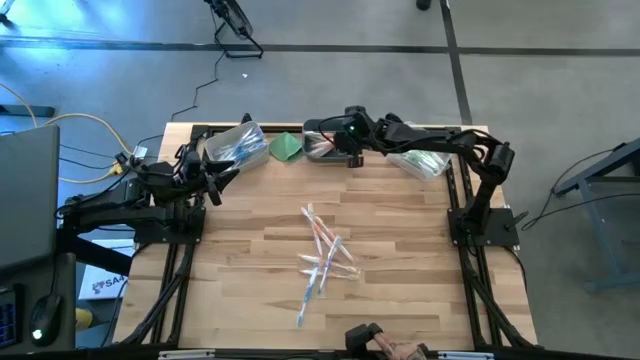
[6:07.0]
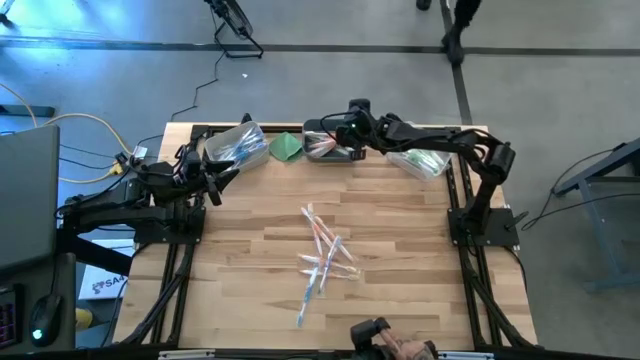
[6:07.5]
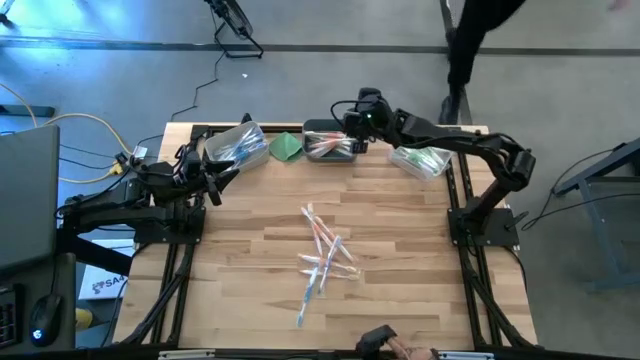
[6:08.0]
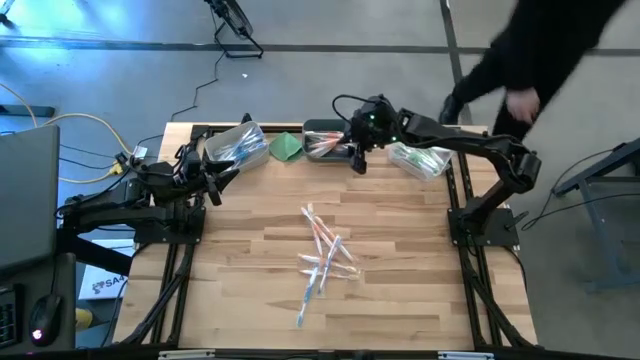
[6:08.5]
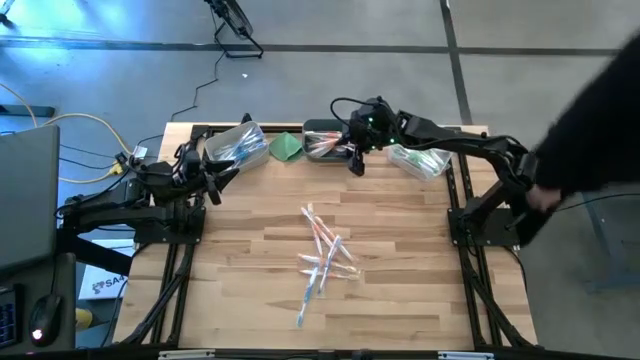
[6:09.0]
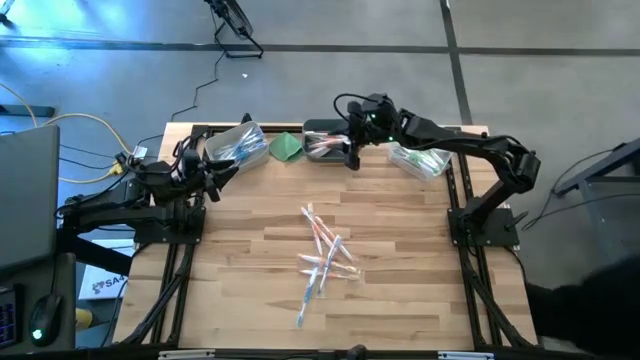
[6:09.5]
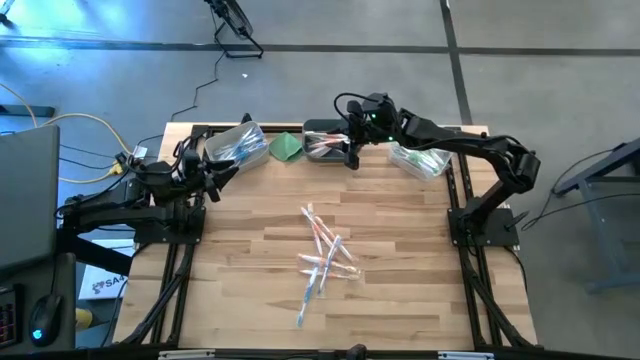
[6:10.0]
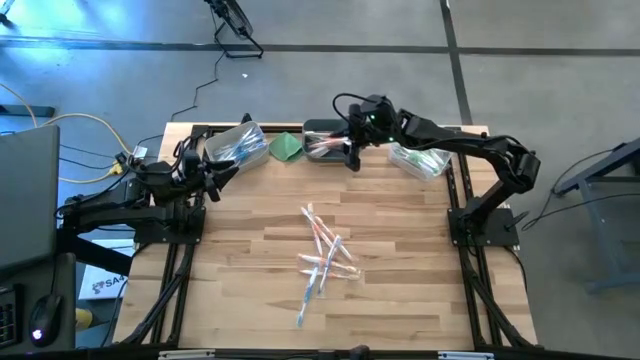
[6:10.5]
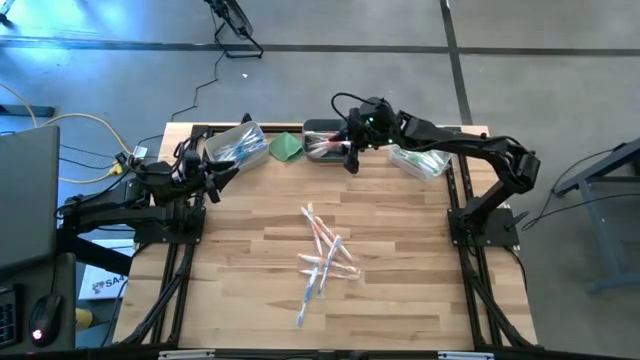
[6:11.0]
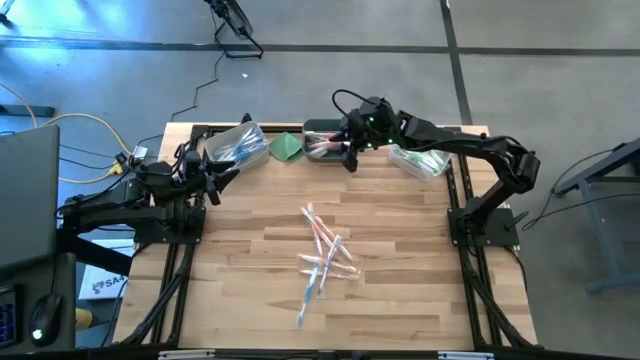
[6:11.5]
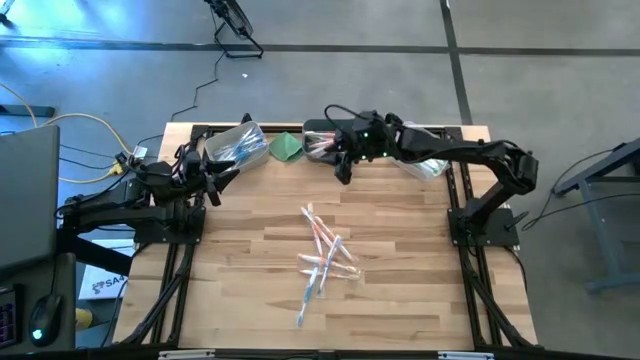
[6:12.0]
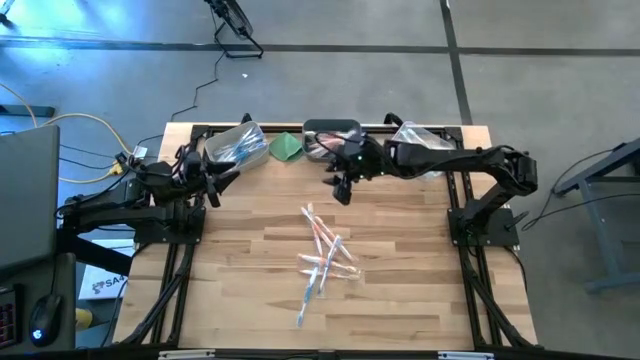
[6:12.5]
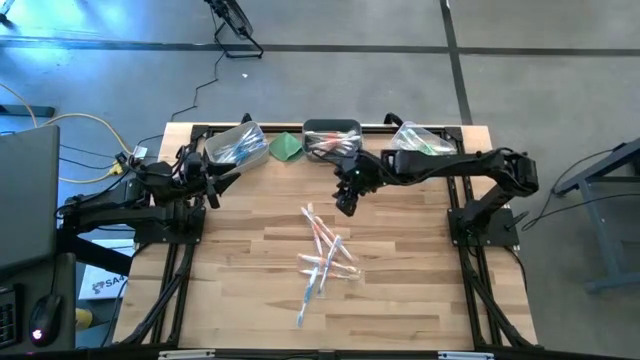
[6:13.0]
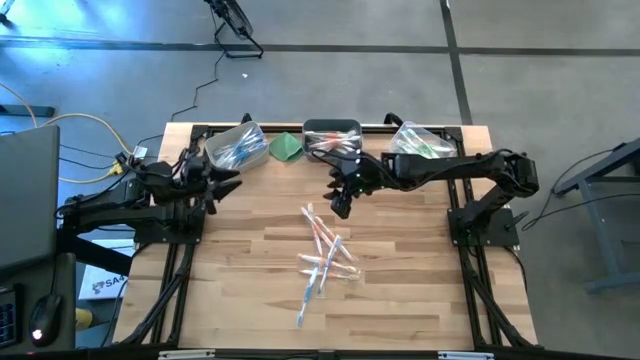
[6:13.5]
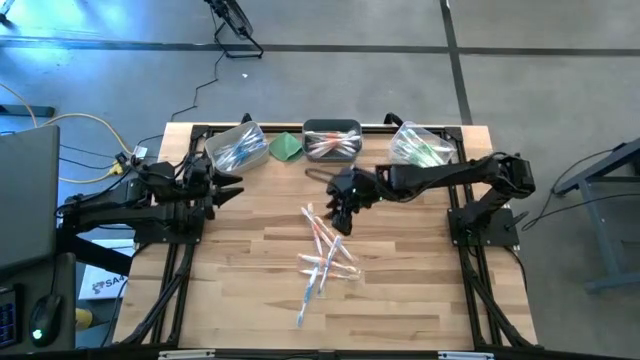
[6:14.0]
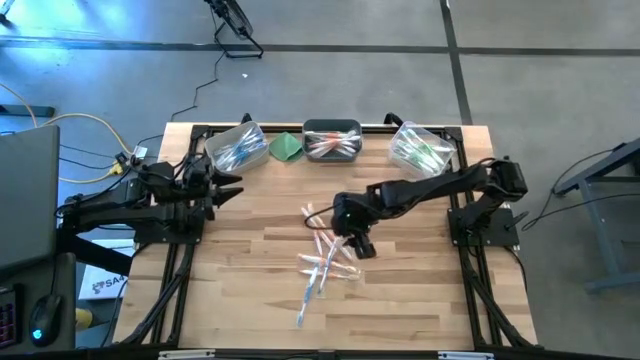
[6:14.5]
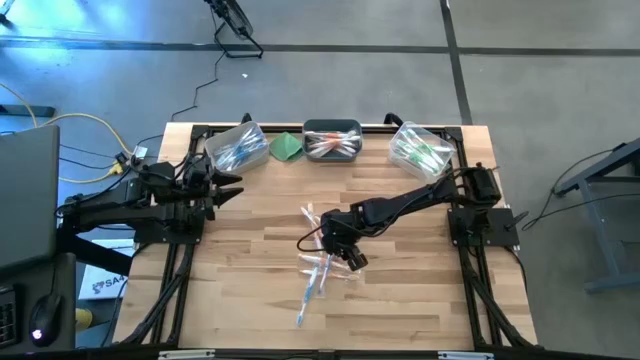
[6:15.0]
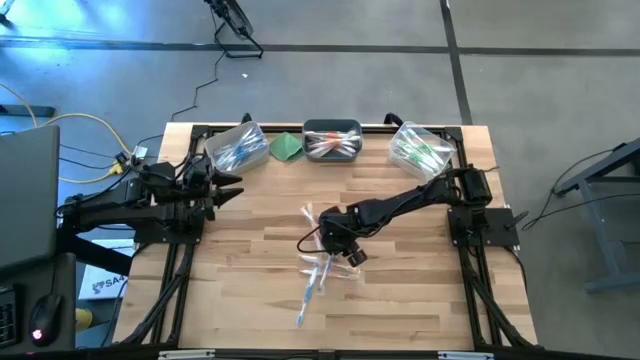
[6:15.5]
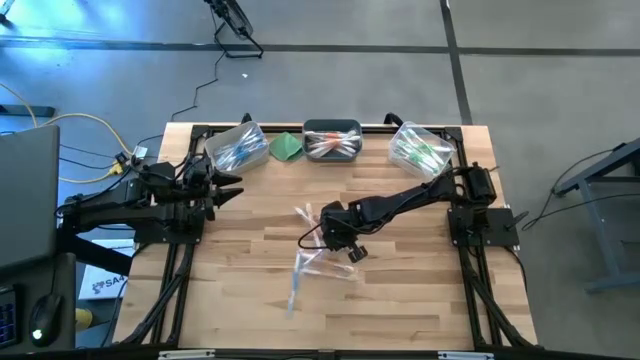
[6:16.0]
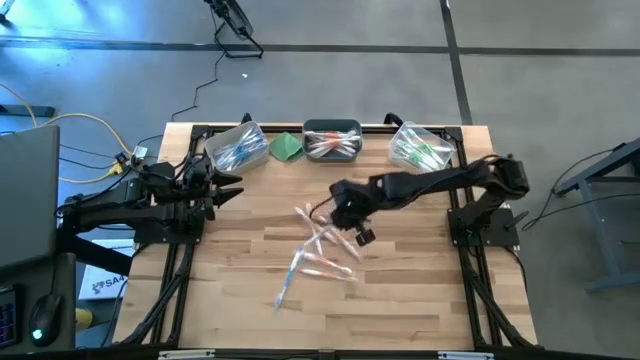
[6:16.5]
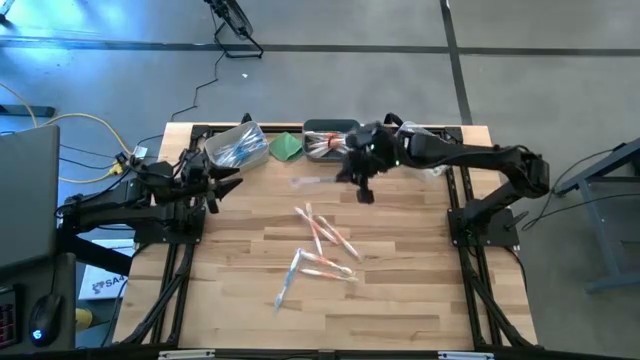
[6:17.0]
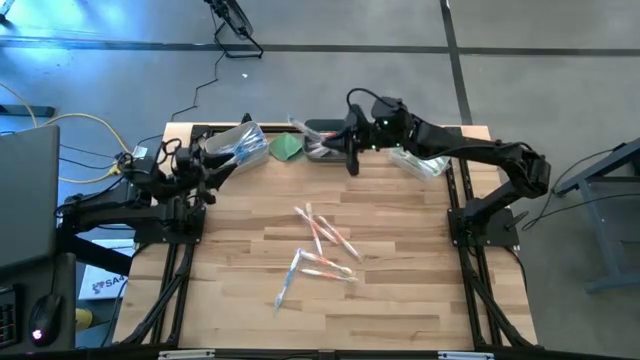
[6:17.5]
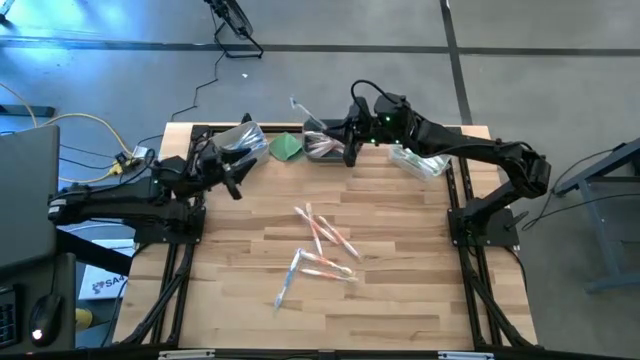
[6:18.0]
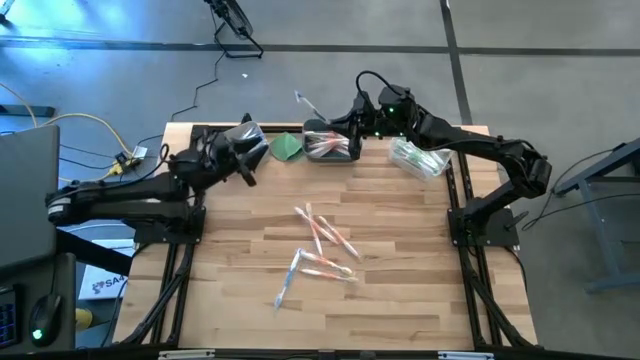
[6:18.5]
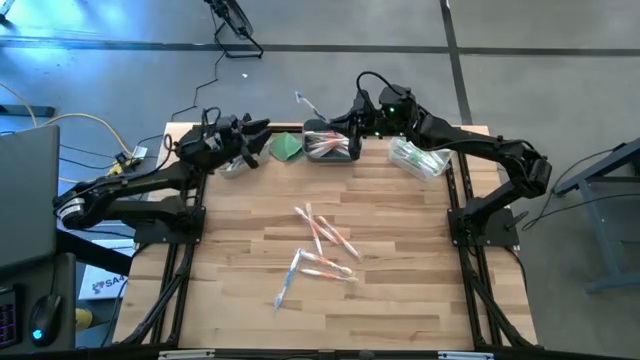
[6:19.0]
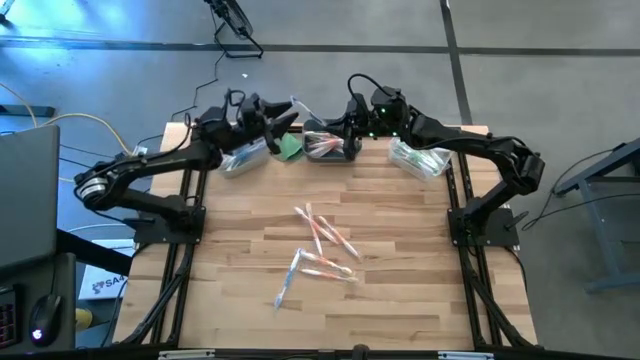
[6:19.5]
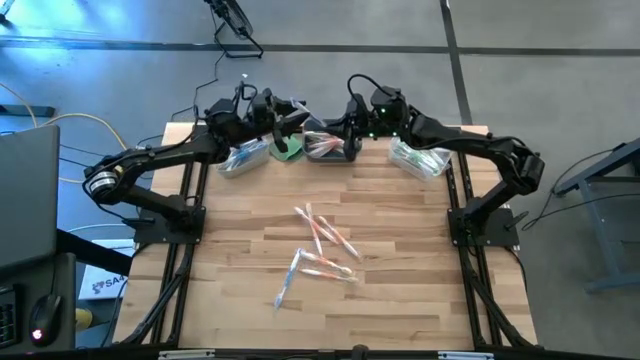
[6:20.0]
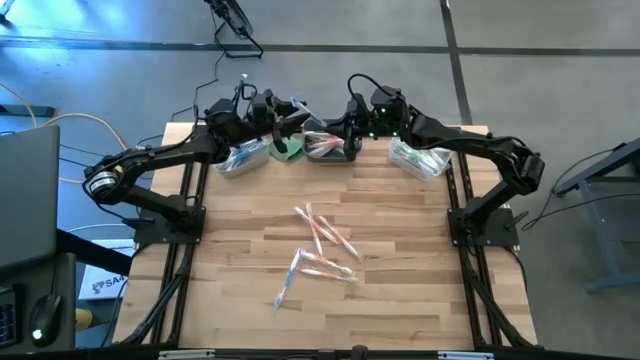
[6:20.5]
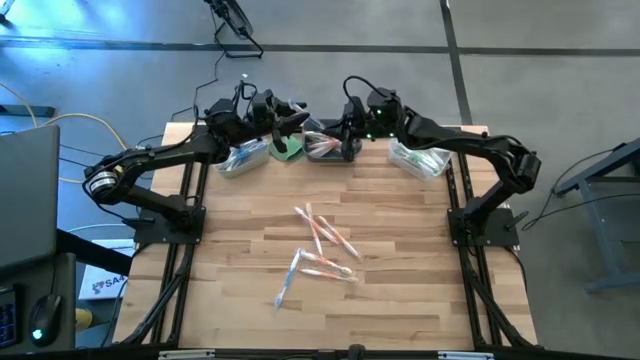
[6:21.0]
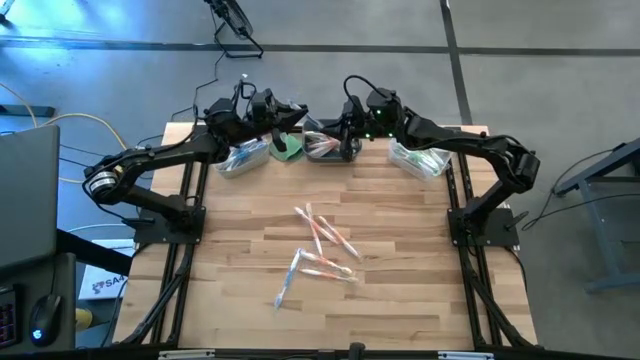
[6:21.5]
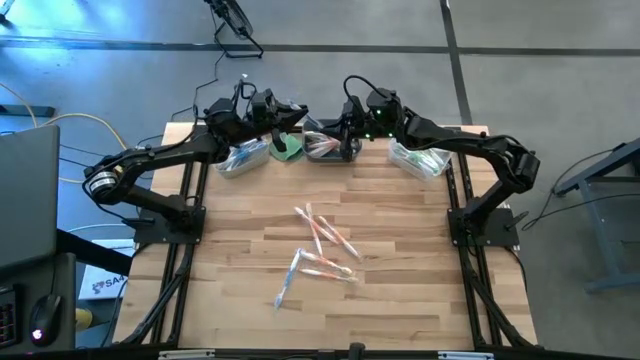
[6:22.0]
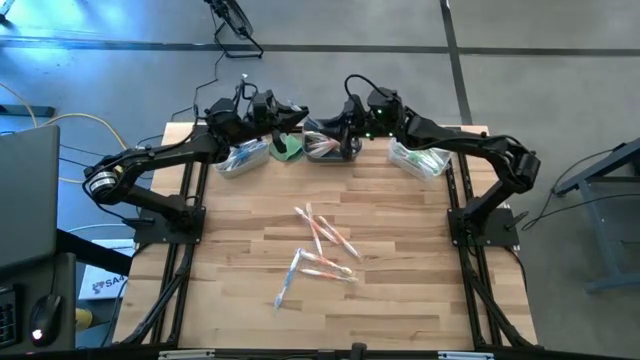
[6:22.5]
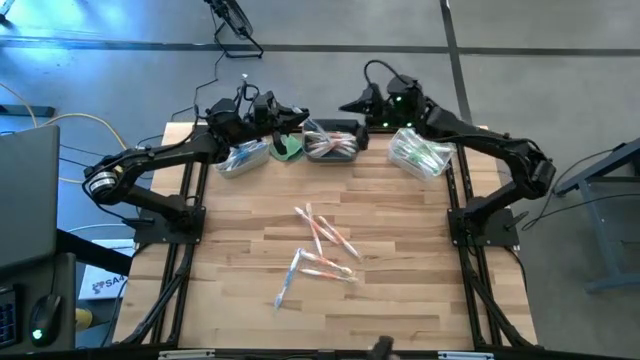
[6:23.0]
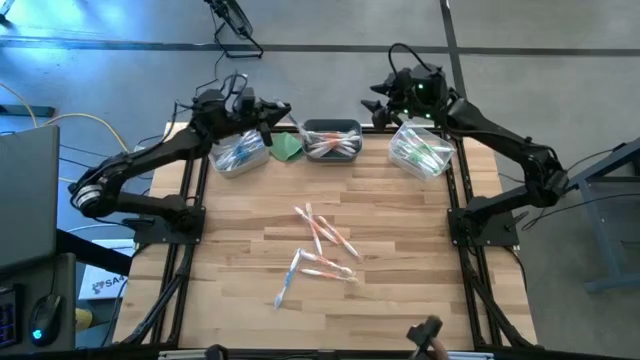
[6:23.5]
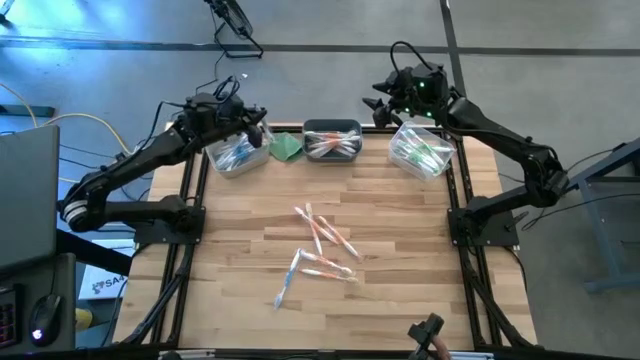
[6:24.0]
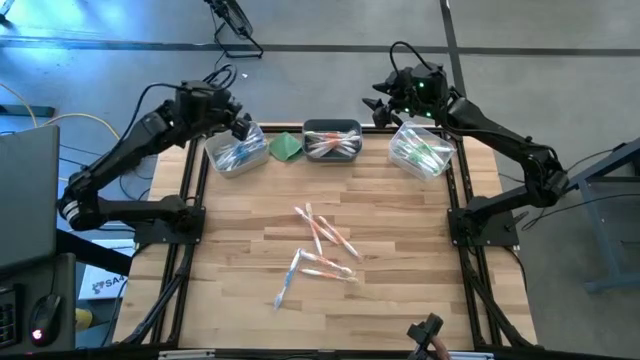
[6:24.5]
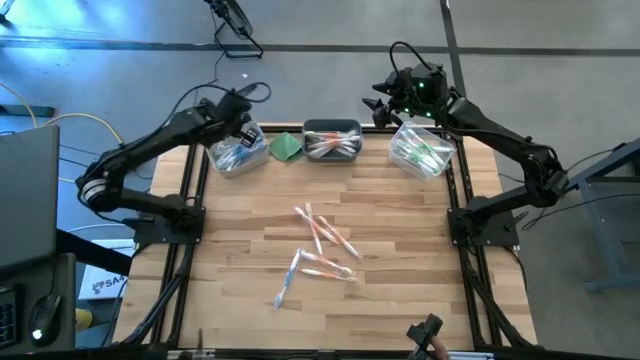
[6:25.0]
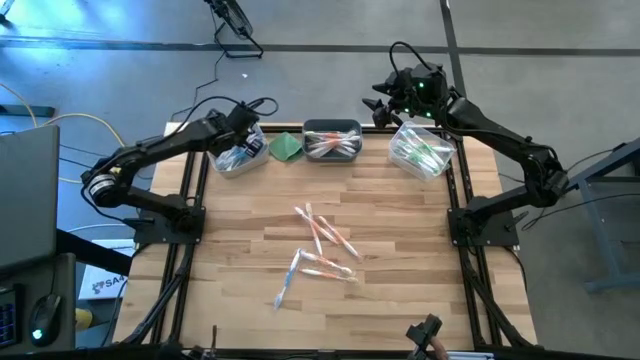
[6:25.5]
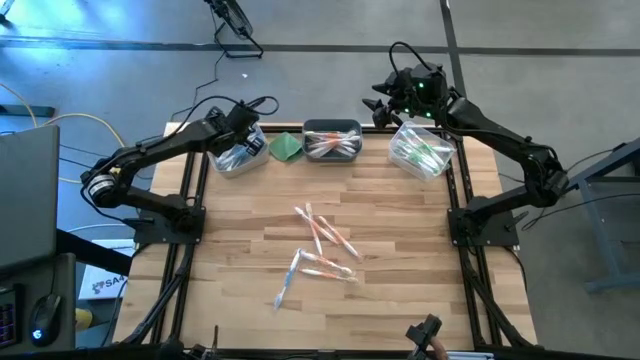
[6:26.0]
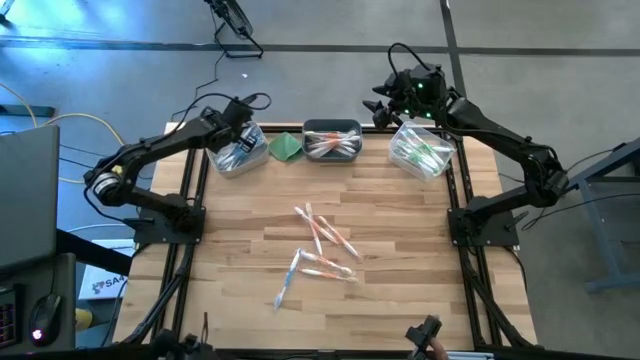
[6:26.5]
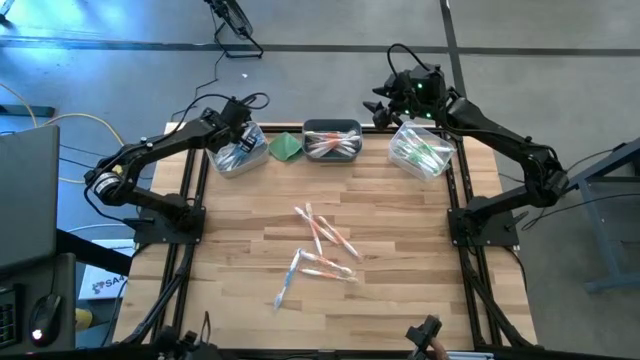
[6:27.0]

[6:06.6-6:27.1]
Task: Pick & Place Toothbrushes
Put the top blue toothbrush into the gray bin
